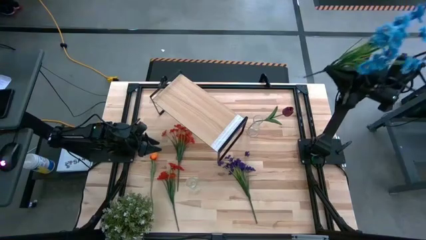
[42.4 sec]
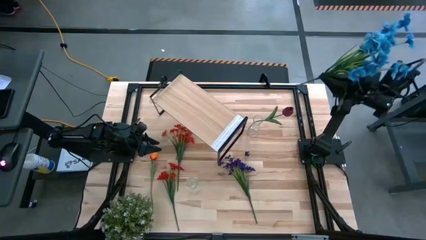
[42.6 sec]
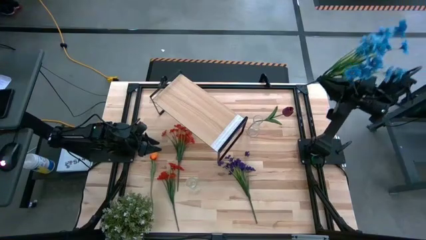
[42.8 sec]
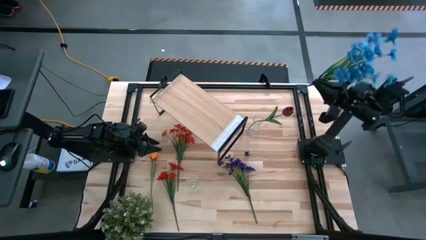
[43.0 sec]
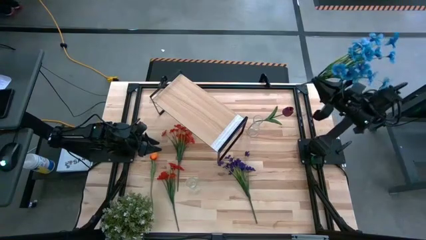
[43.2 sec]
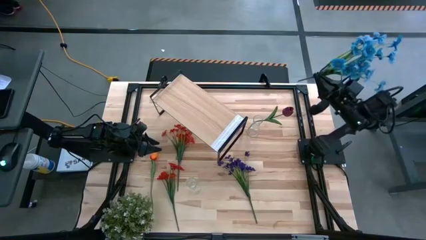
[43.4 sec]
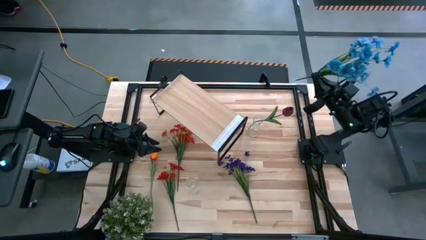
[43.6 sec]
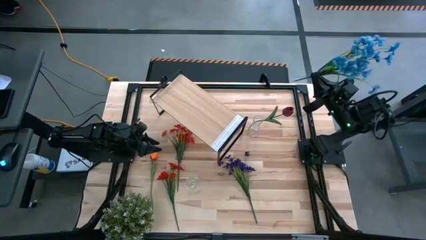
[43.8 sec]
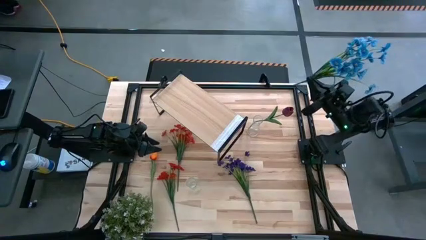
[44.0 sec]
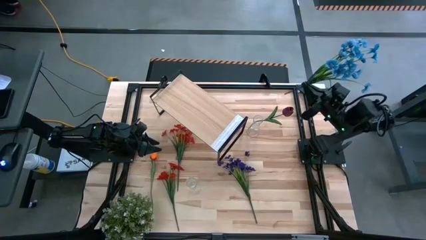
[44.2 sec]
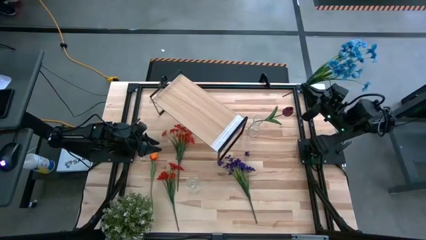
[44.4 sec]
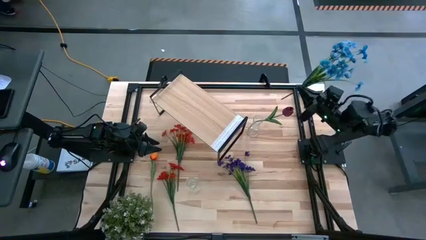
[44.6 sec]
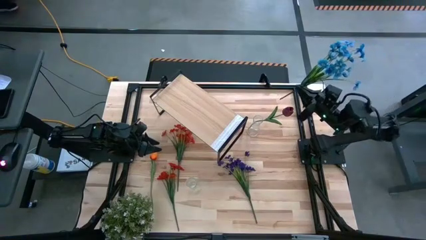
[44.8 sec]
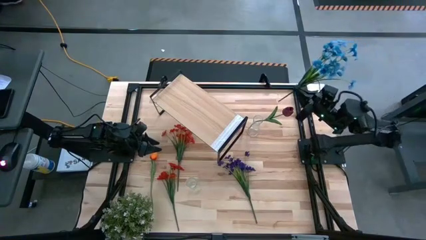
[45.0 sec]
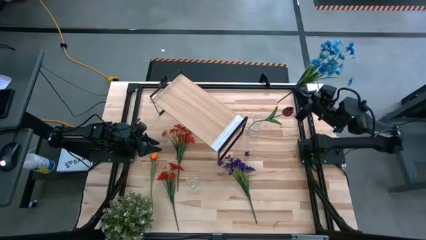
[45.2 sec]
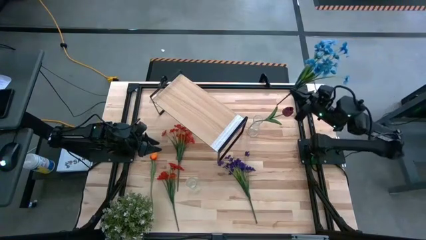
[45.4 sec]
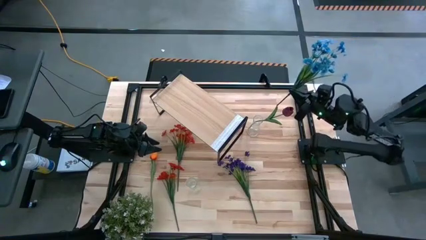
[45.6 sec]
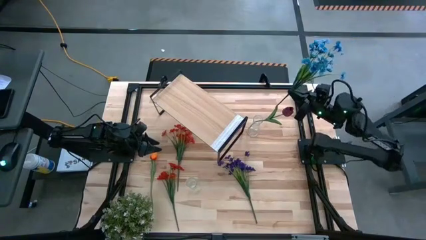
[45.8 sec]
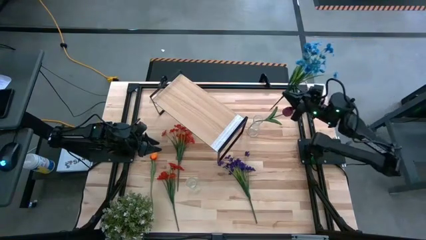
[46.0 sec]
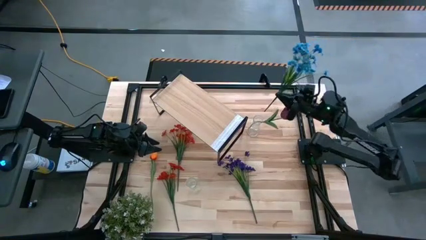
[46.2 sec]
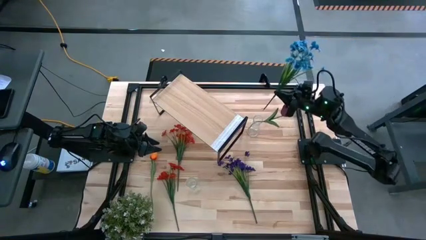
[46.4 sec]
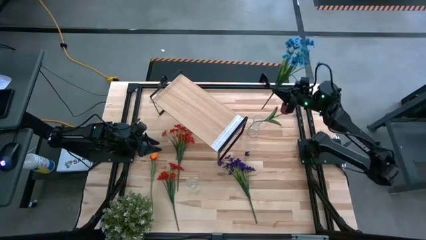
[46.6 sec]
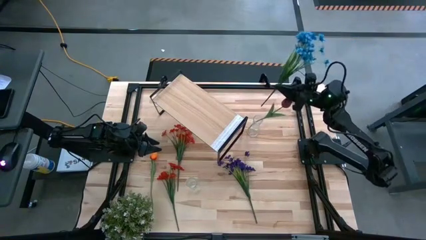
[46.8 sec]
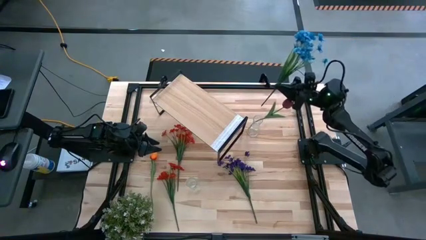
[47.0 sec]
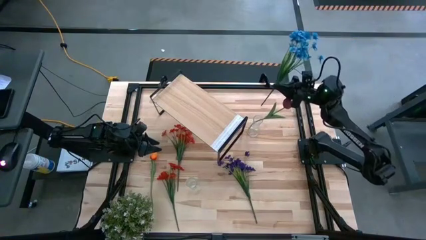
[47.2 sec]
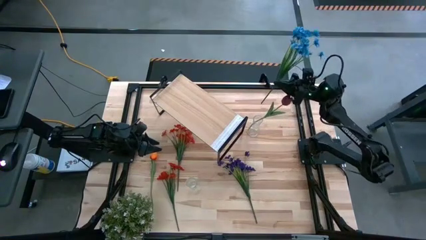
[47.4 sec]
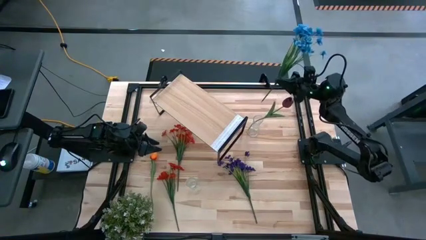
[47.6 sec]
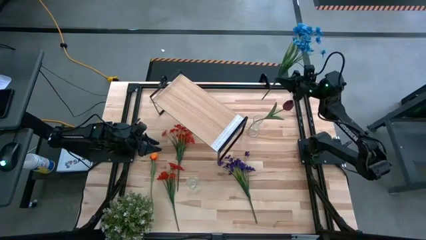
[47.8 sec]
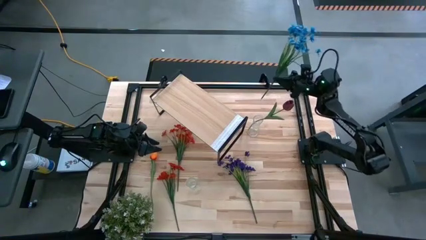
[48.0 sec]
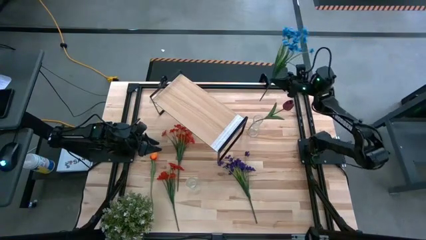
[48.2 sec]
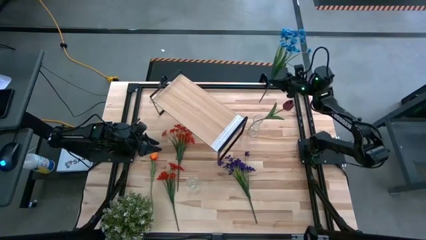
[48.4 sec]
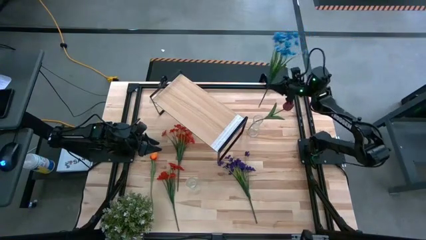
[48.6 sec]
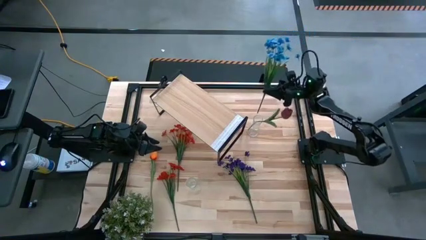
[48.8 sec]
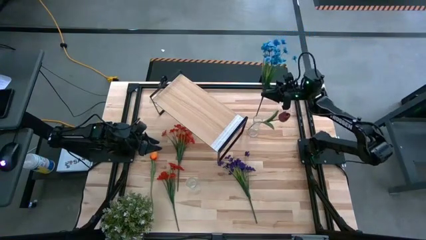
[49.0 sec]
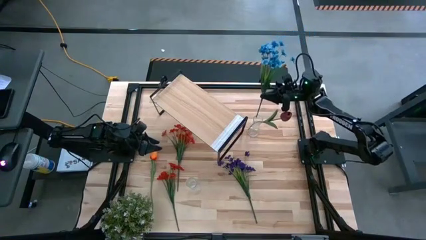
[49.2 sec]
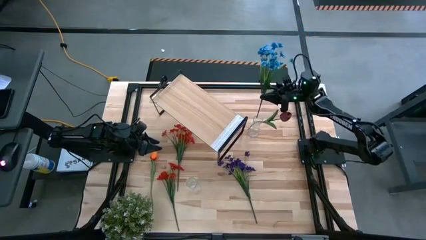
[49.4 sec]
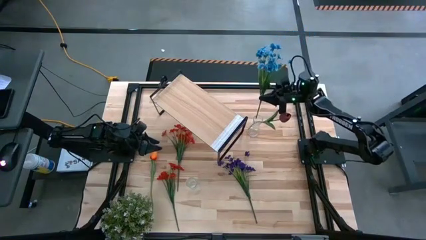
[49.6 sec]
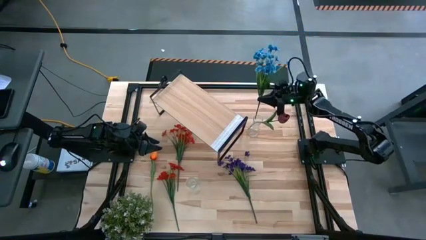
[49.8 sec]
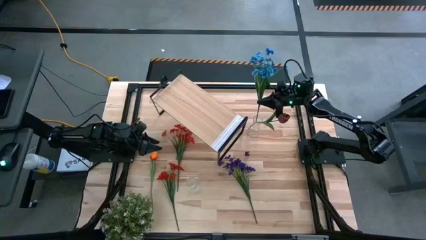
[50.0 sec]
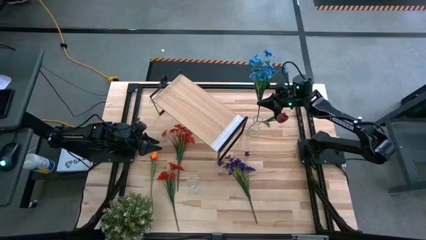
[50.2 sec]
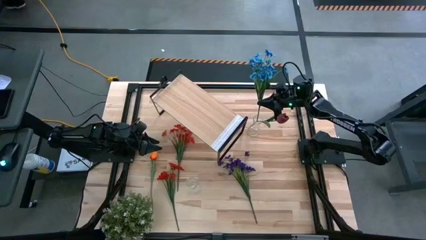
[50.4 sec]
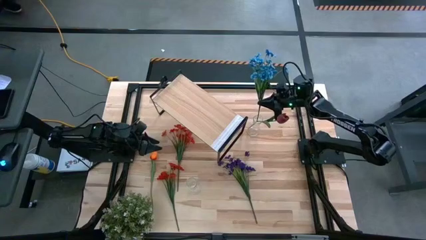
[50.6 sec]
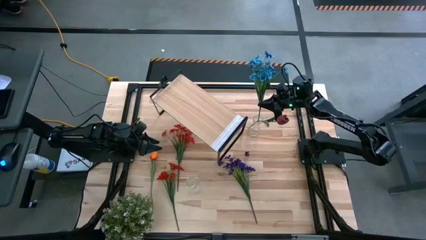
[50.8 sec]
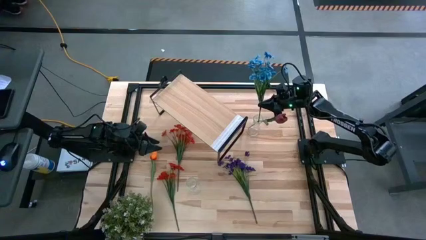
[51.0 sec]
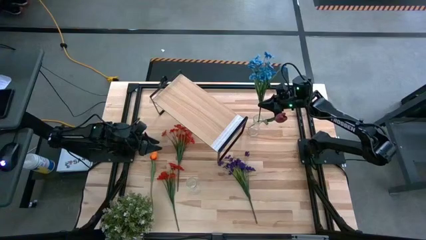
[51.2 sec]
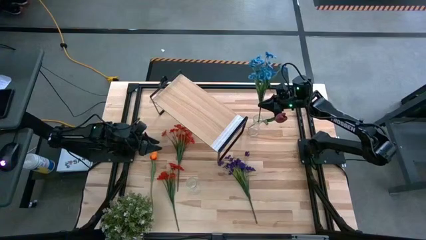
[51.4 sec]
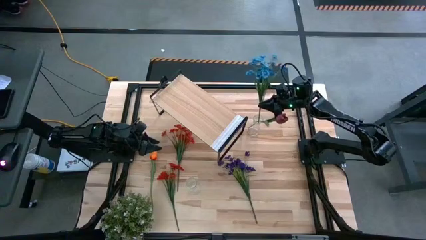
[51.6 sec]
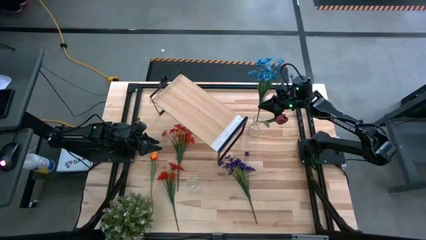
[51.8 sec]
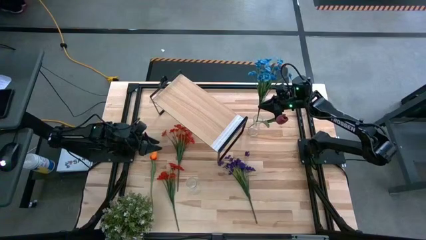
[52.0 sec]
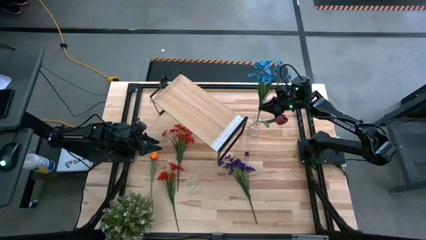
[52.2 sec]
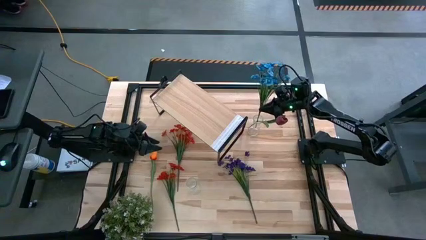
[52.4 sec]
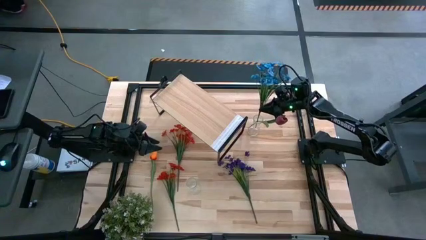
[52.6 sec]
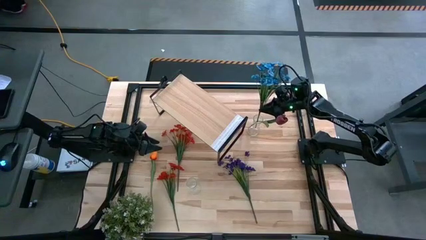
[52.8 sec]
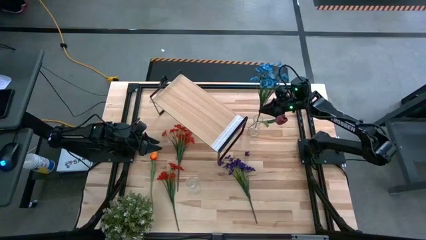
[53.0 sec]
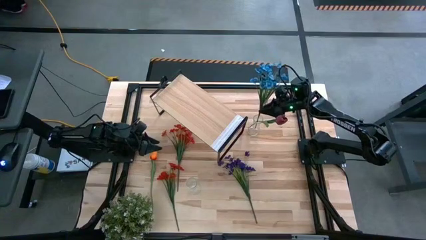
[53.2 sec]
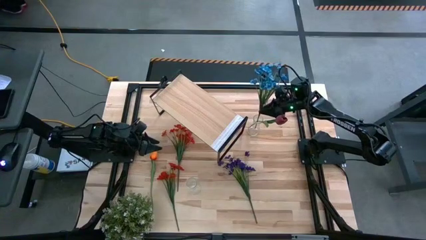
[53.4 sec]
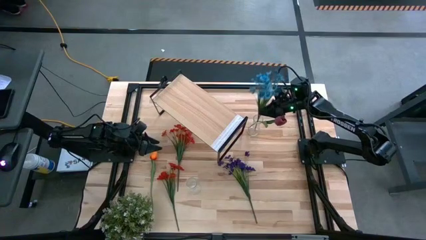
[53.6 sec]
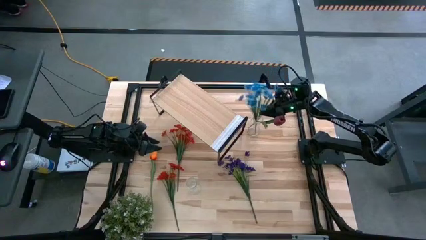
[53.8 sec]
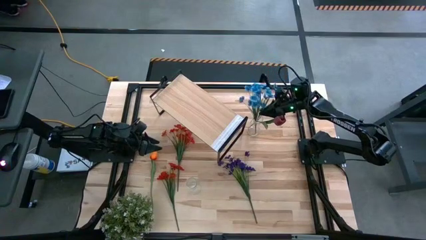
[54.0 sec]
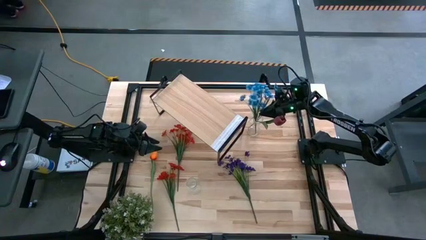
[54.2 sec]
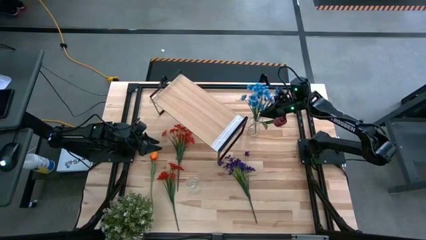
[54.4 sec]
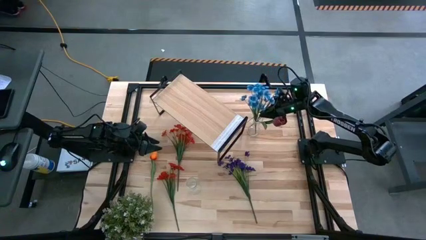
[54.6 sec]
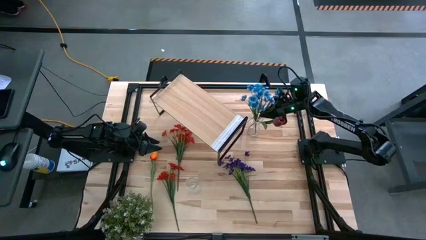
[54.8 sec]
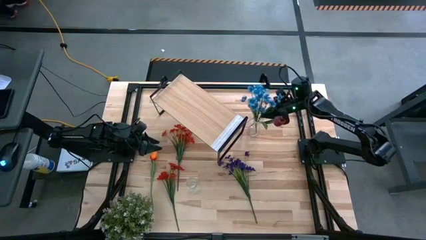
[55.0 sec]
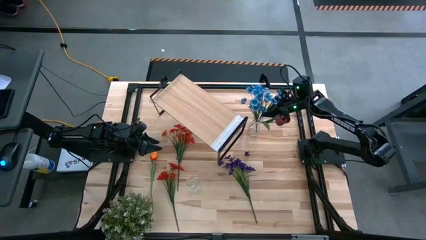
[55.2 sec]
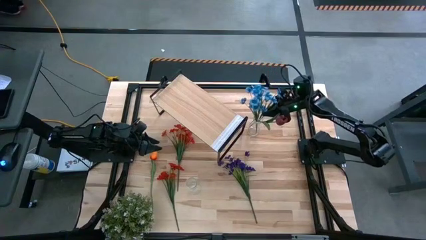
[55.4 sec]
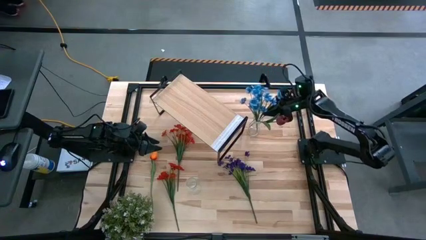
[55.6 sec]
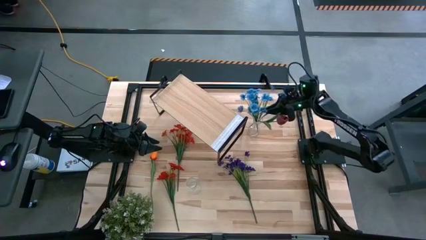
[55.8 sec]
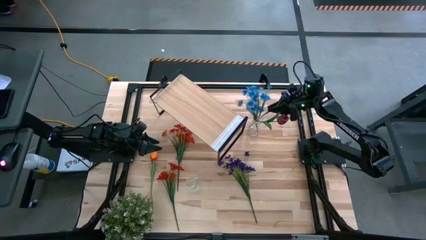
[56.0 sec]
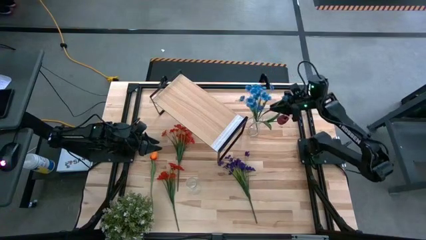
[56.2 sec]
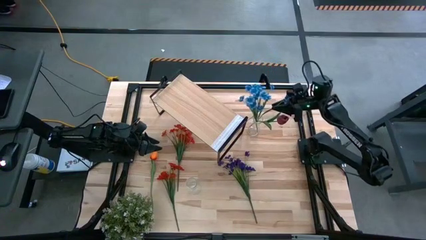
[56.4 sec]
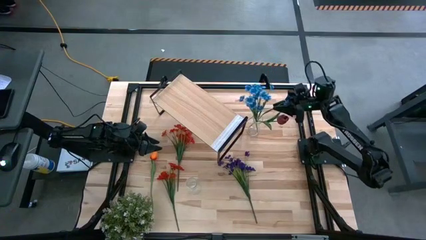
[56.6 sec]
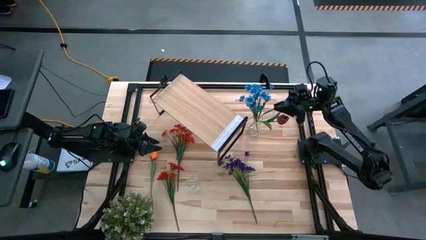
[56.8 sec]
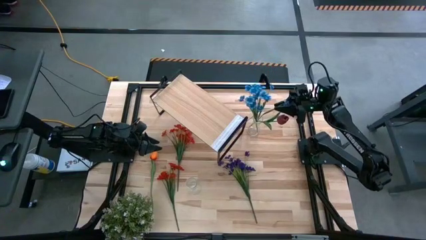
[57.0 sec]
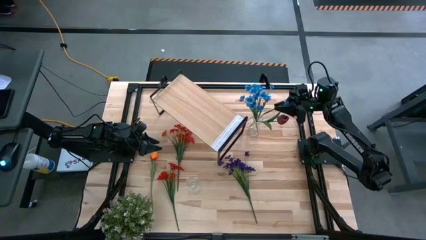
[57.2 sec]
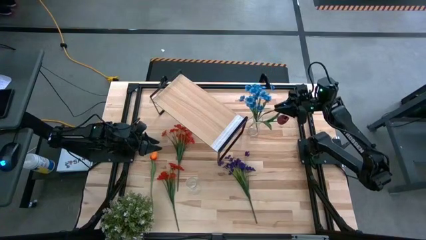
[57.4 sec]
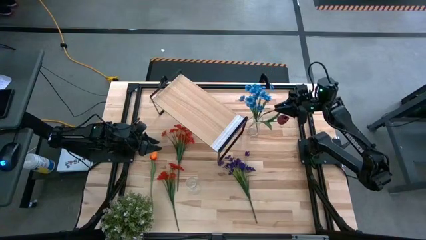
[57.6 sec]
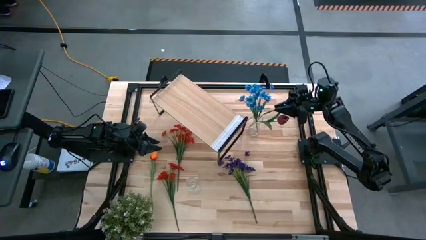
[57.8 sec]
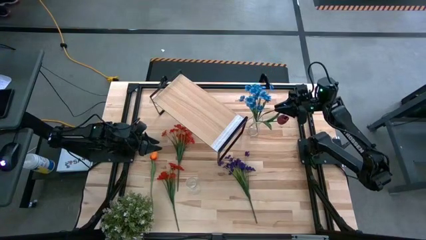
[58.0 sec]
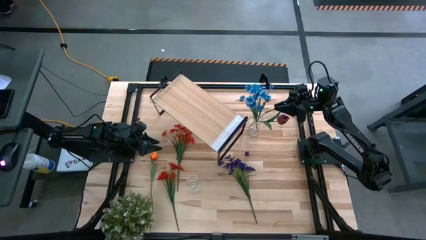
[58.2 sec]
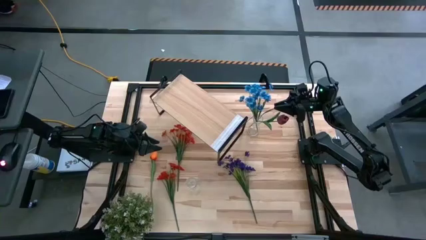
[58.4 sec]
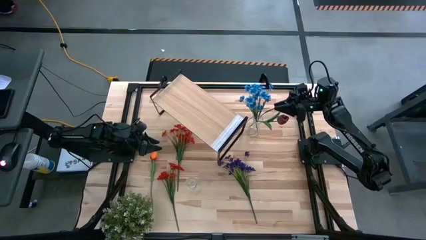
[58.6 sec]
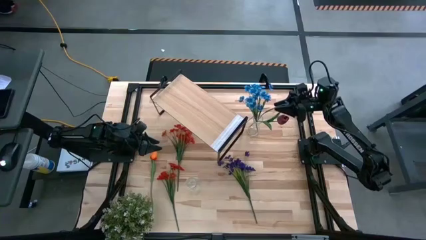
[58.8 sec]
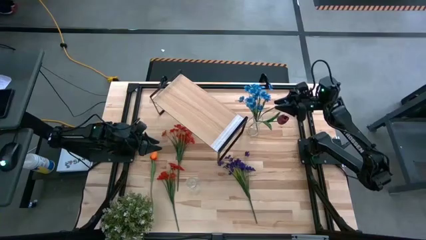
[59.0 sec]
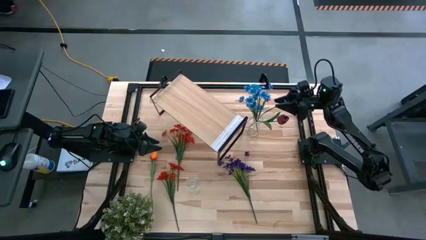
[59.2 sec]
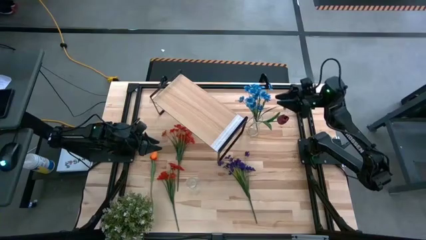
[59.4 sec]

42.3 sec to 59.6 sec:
Task: Pick and place flowers into a vace then onto a shelf
Put the blue flowers into the top transparent vase
